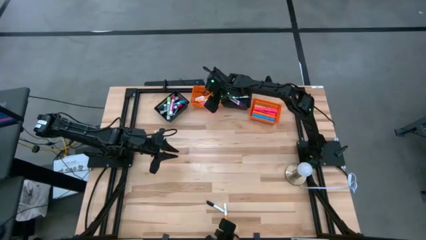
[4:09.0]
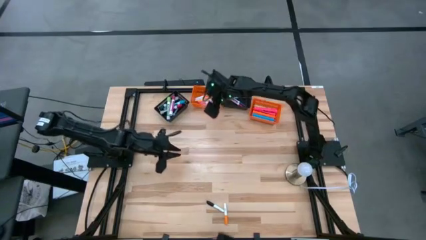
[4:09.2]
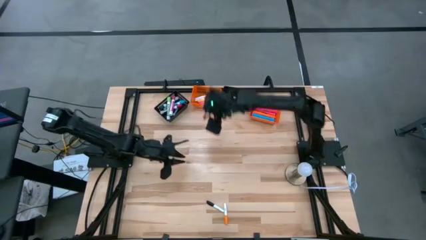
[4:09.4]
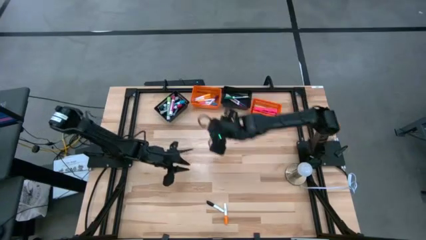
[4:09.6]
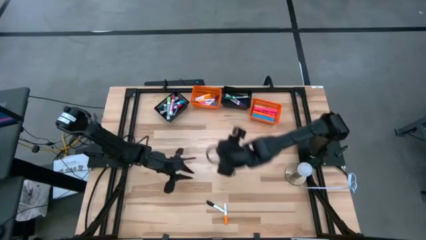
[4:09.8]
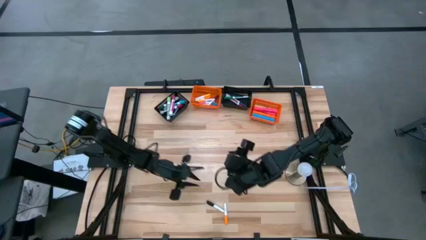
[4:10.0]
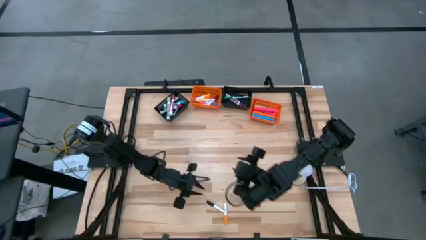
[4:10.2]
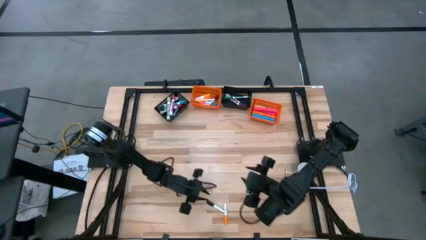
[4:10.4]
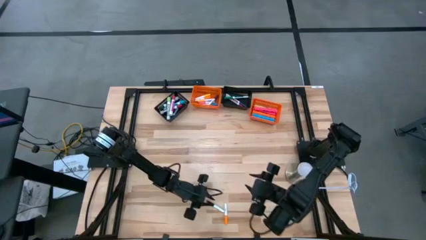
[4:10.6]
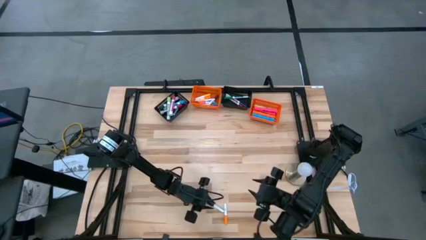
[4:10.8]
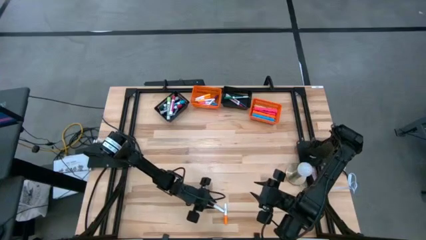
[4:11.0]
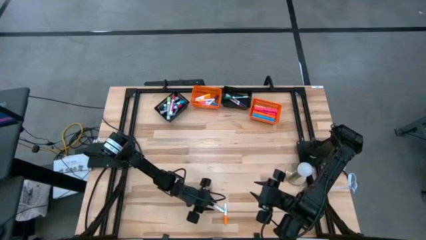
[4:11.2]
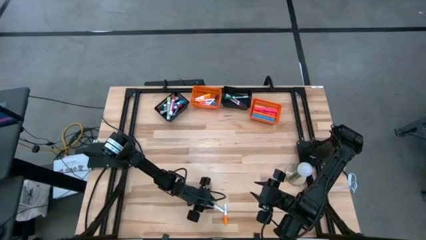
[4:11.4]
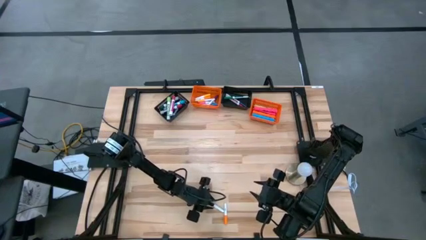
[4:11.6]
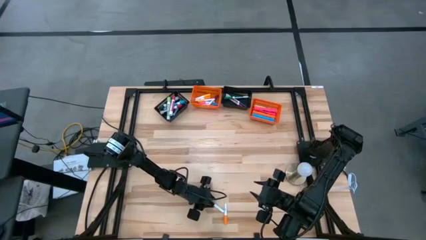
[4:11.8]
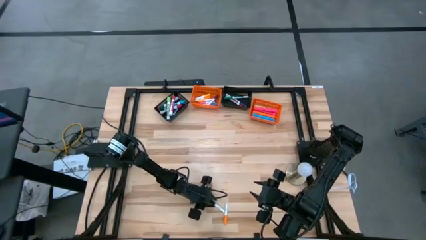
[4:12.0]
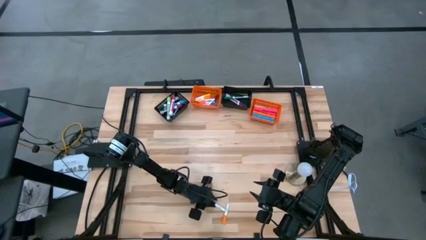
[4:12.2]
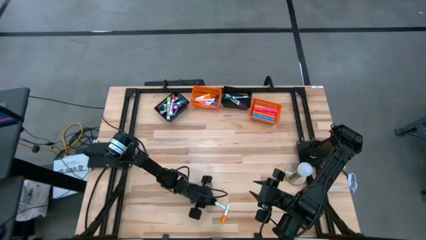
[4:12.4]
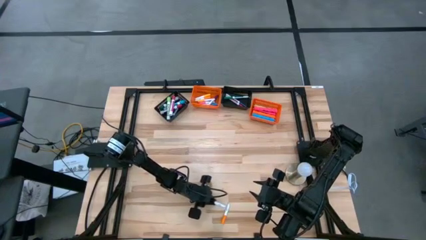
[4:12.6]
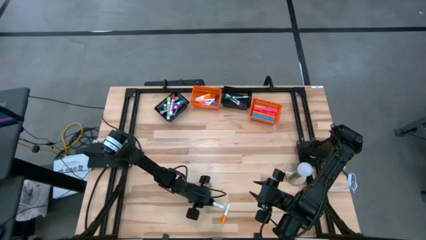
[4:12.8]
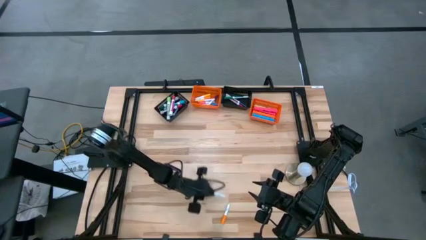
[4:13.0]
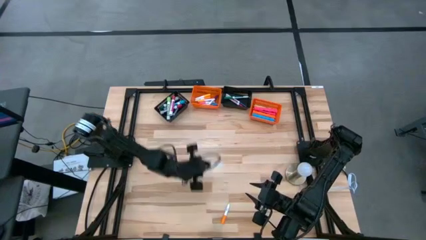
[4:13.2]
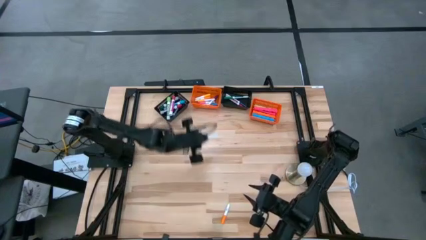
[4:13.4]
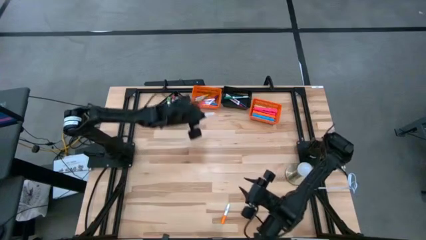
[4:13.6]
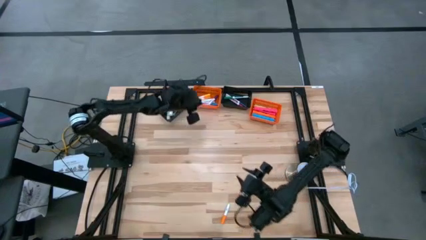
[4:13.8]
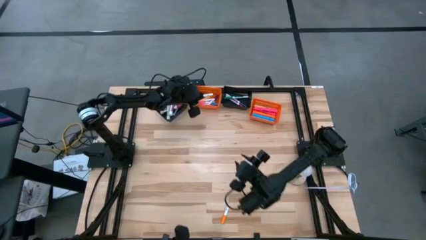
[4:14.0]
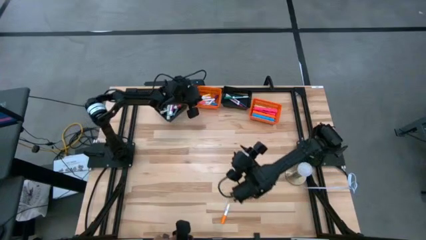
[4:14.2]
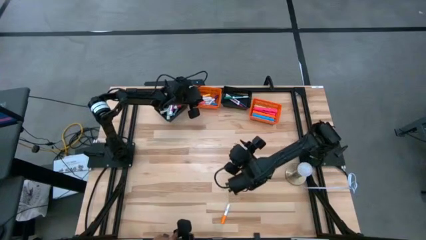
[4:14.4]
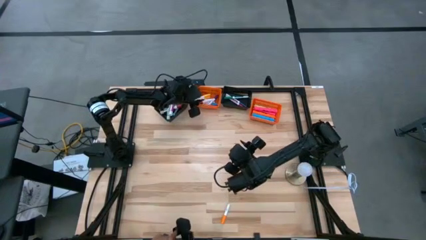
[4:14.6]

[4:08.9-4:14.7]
Task: Pick & Place Markers
Put the small black highlighter into the left orange bin

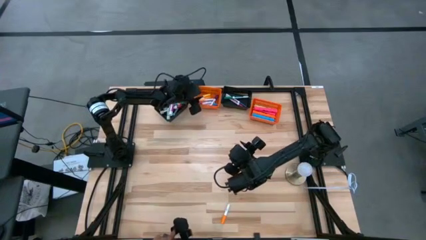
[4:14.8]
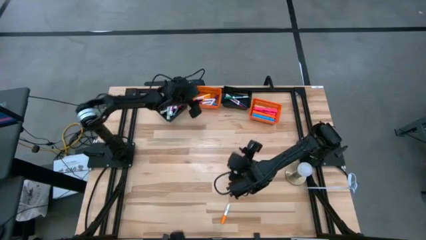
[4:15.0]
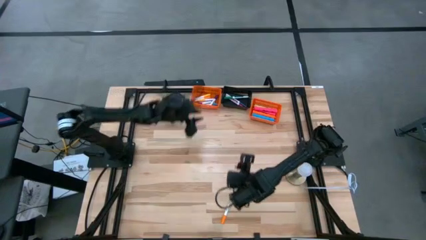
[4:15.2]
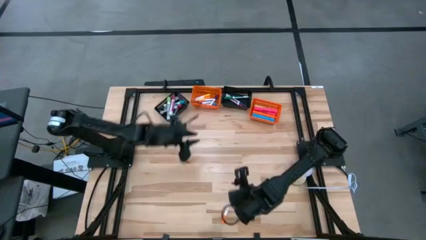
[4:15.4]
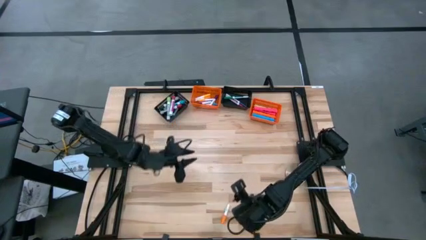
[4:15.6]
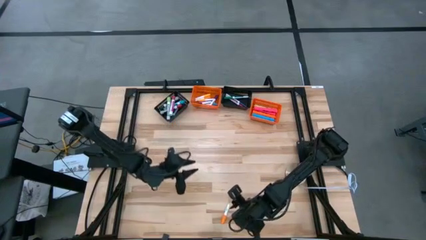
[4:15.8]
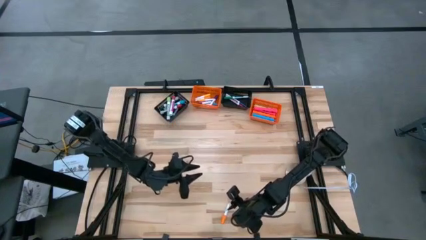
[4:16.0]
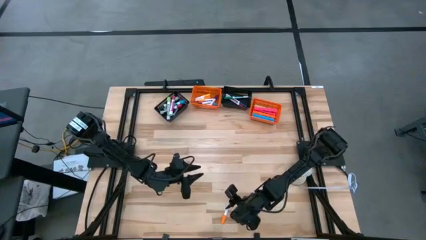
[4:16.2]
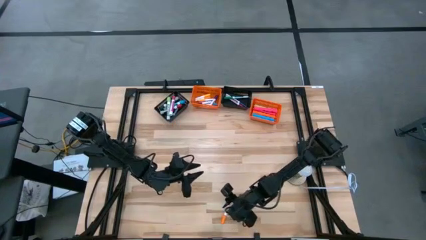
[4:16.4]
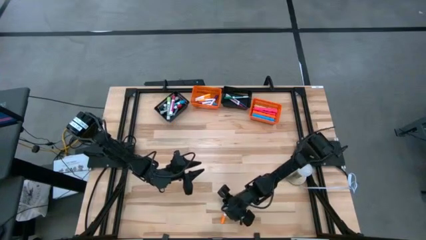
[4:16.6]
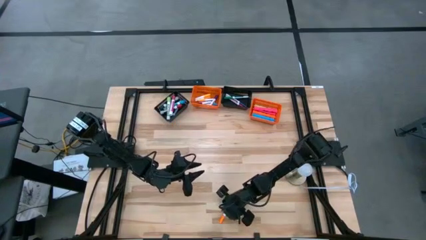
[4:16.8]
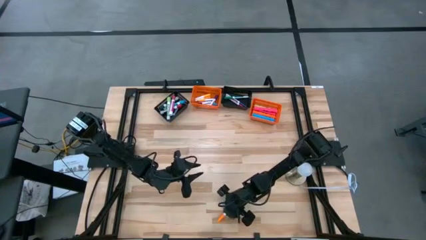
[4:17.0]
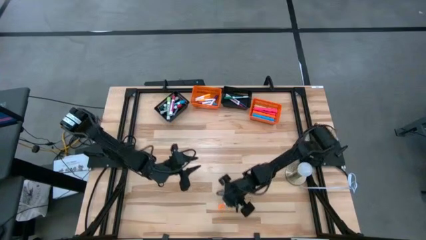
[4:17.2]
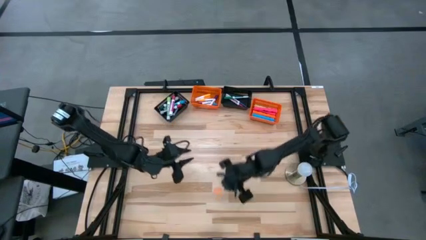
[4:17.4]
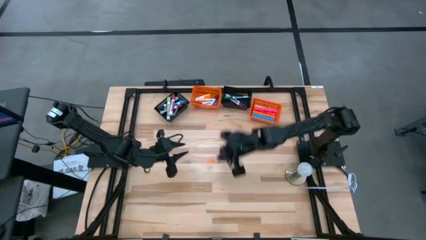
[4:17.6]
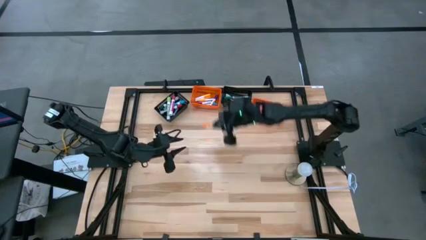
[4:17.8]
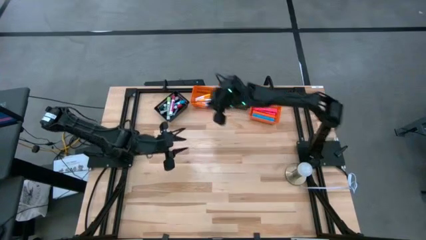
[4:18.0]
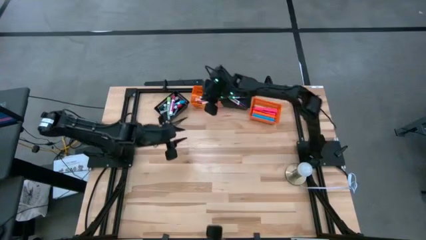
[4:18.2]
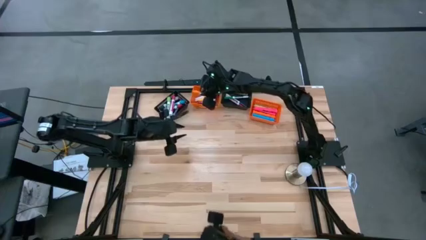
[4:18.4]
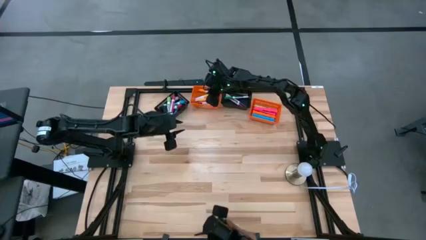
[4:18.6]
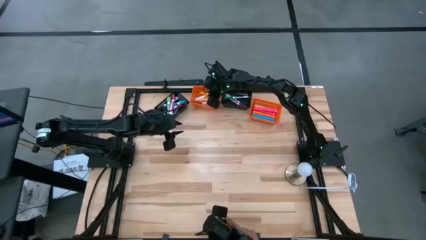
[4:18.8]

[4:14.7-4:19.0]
Put the small orange highlighter into the left orange bin

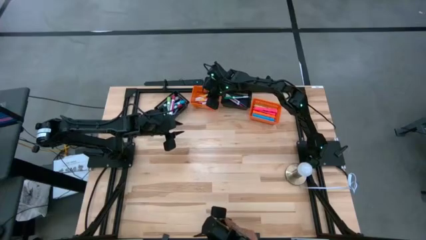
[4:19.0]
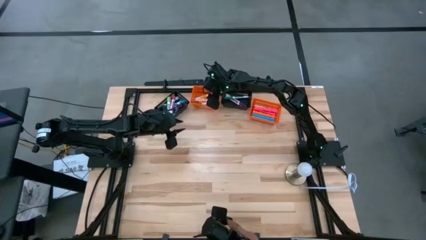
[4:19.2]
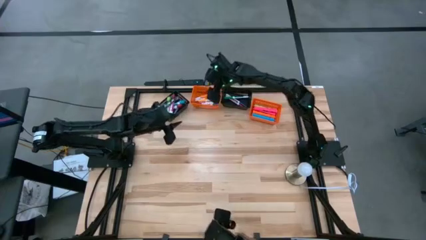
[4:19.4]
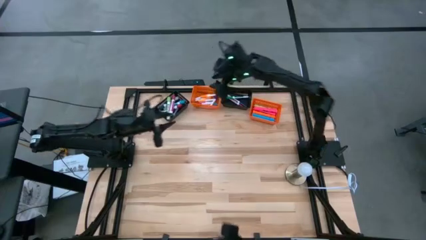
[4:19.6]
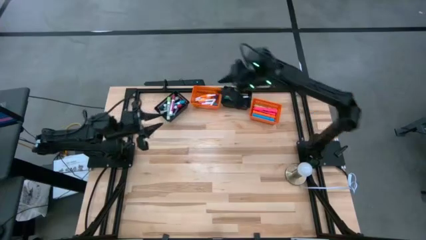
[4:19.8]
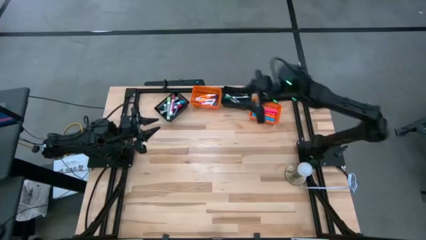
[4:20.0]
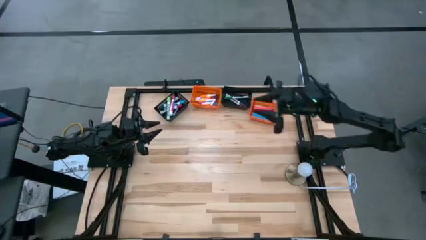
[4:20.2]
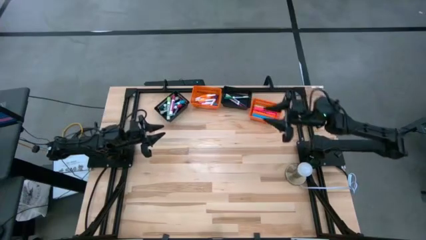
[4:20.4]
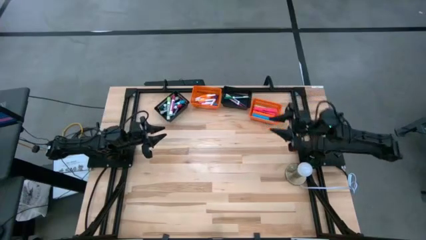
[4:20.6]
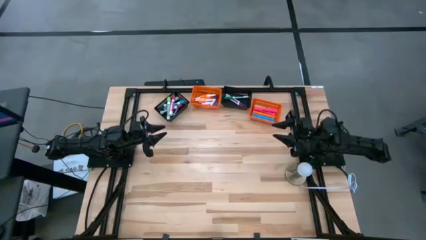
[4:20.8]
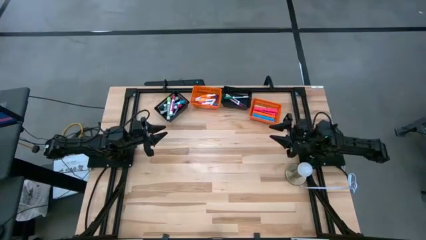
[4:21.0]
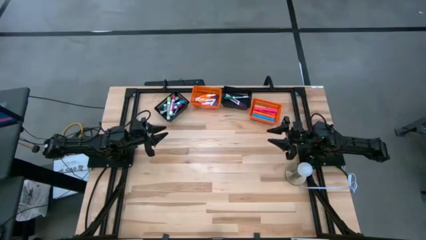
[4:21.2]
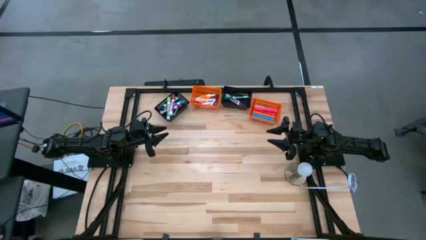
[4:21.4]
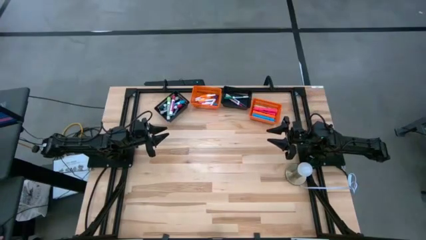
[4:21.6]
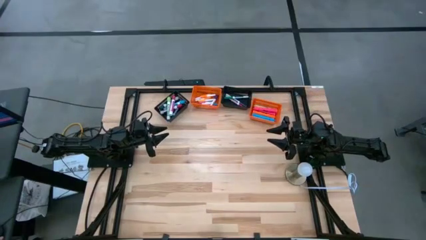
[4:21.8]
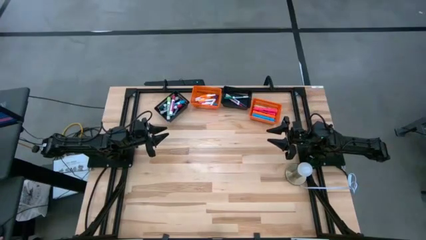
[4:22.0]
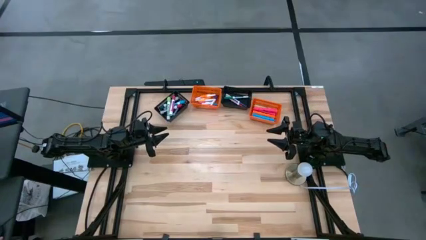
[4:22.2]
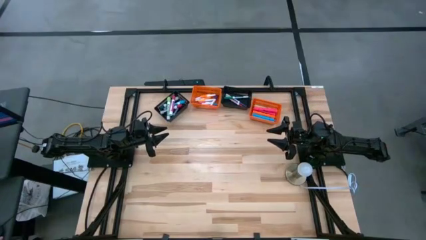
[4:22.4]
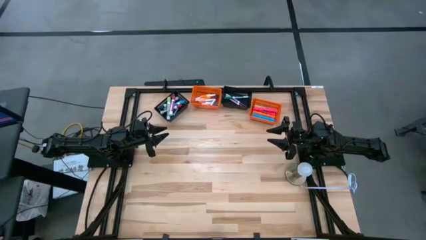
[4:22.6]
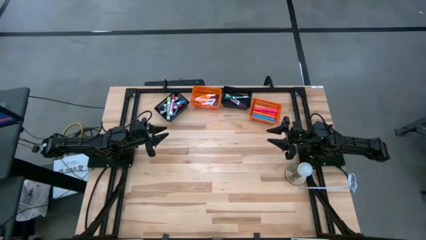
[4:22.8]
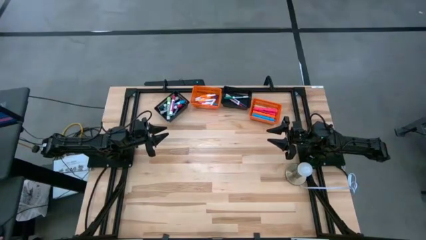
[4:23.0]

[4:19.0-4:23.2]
Return to Home Position

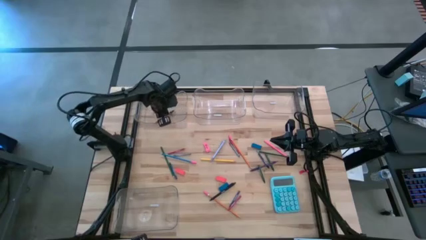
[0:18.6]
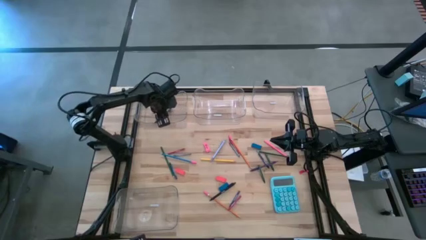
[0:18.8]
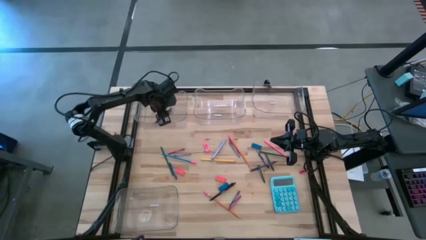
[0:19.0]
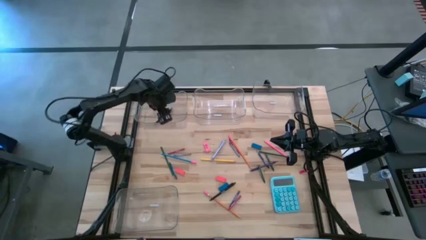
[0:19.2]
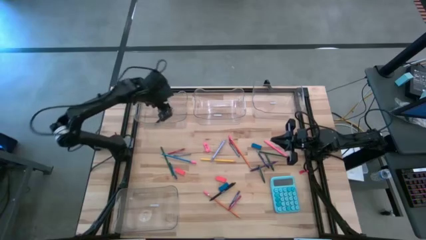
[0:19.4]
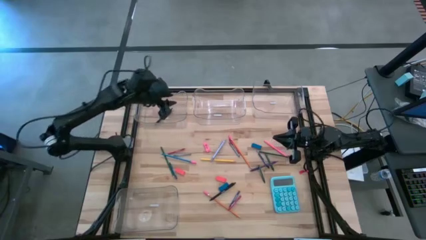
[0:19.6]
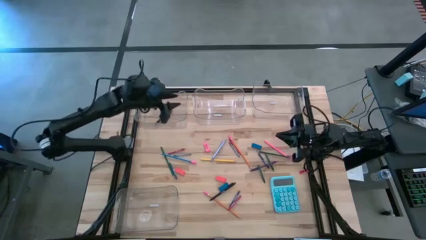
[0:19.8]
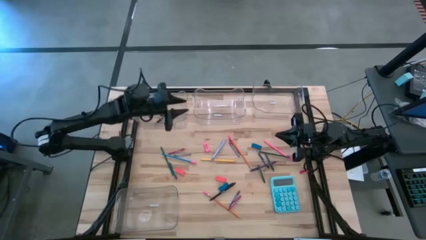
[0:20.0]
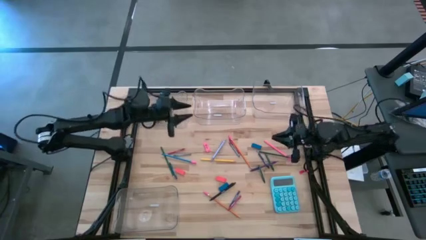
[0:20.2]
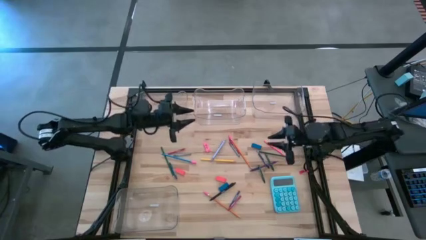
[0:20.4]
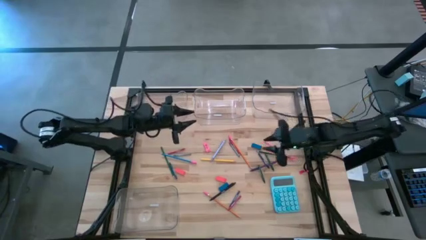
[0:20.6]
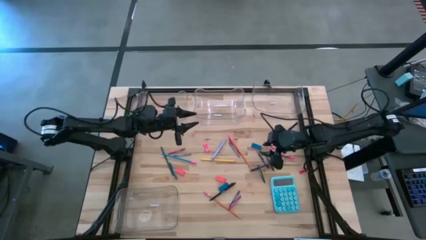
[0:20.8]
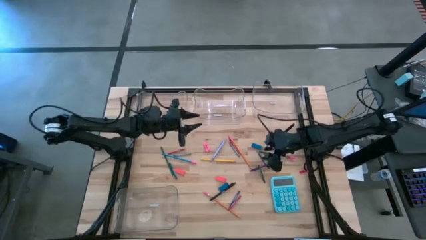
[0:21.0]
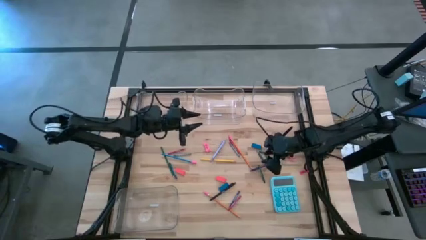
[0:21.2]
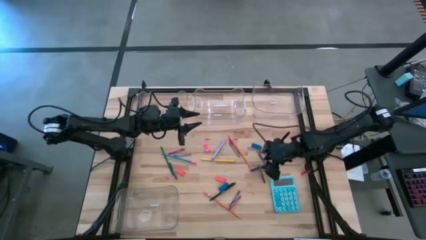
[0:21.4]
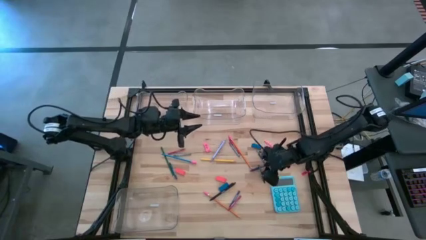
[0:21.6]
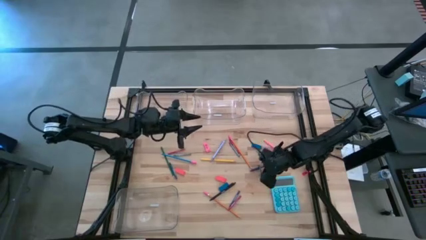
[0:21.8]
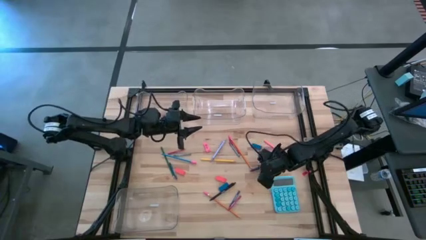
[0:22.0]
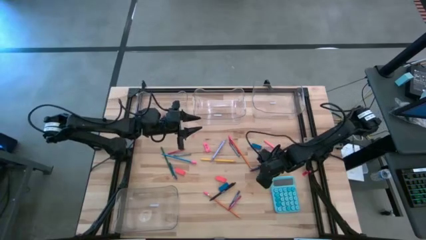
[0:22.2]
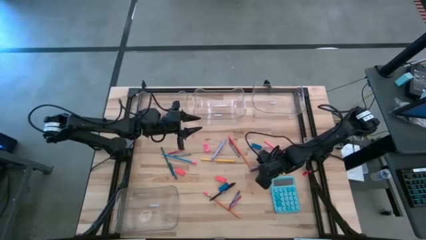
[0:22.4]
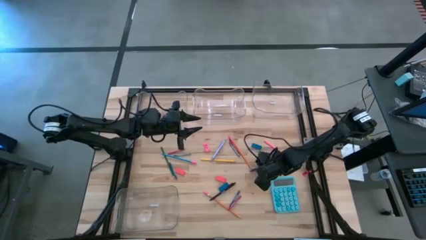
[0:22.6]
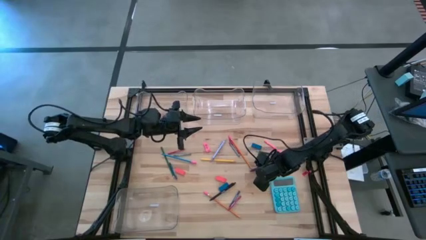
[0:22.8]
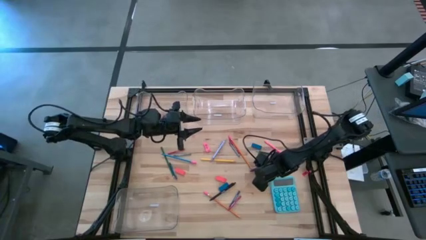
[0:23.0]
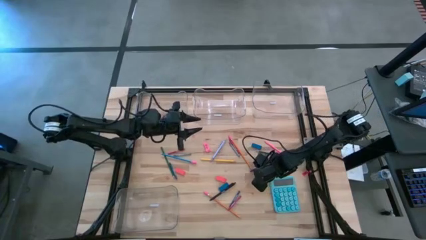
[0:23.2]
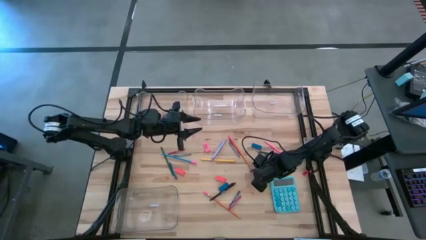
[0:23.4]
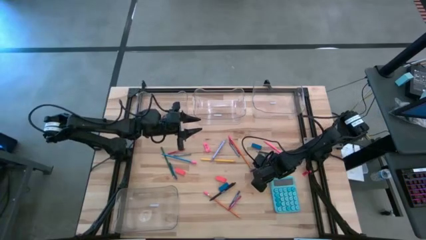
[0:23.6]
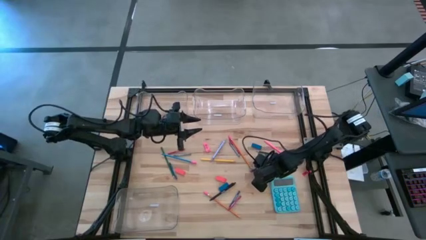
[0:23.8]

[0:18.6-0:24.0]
Task: Sort crayons/erasers/pens/pencils in bins
Put the left green crayon into the top right transparent bin
